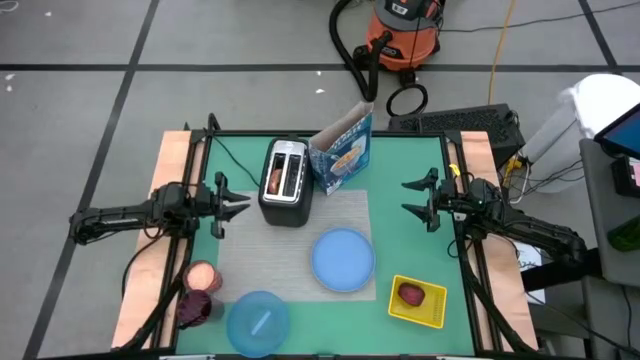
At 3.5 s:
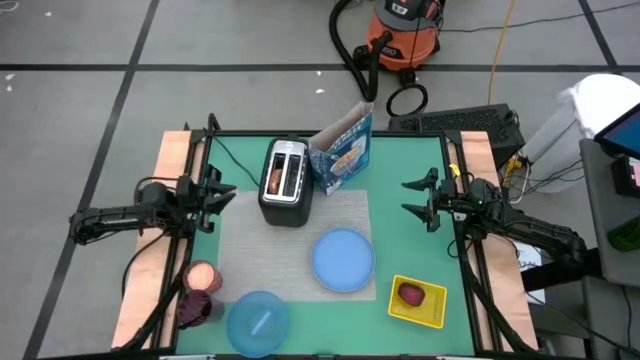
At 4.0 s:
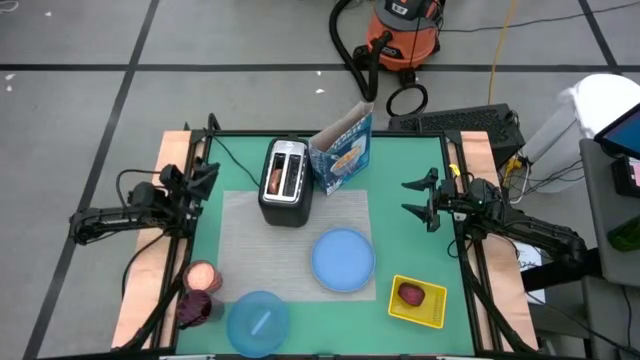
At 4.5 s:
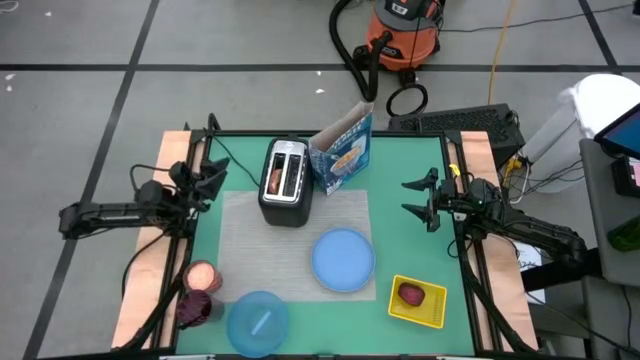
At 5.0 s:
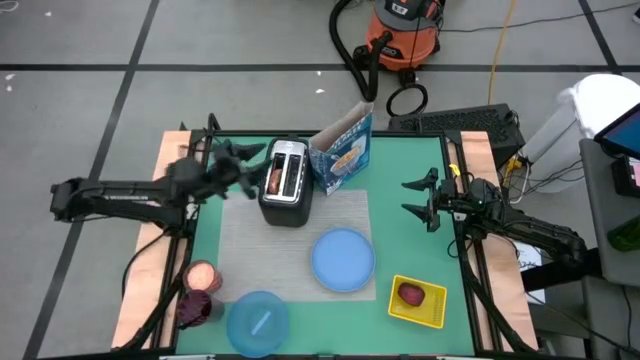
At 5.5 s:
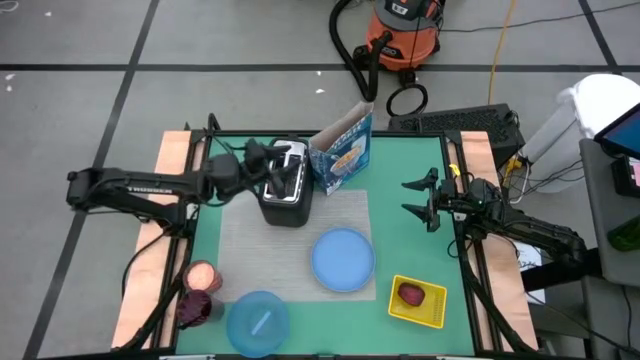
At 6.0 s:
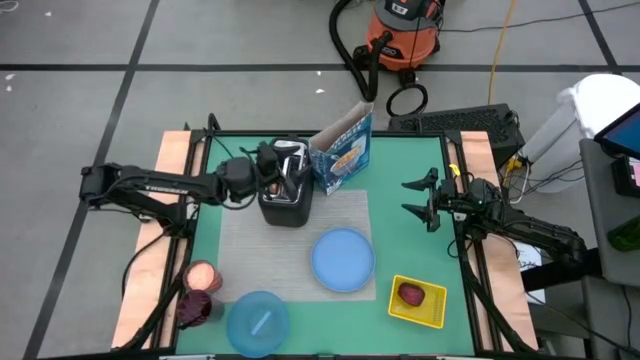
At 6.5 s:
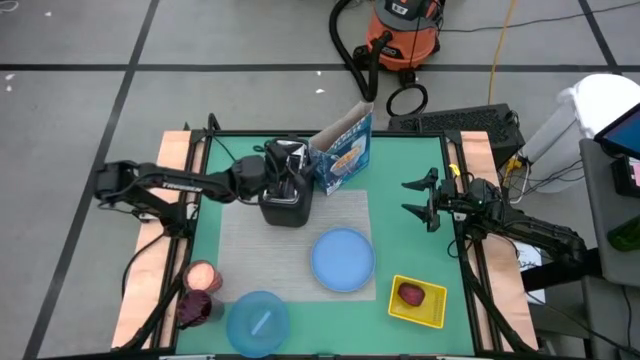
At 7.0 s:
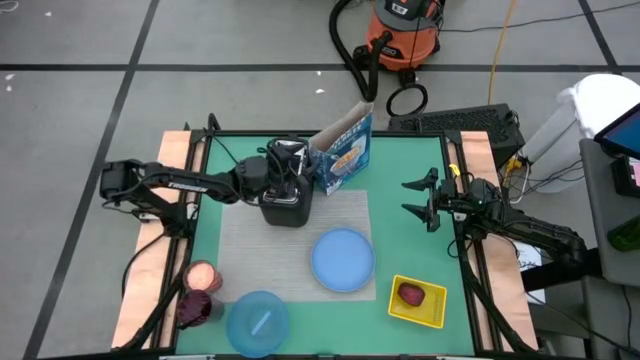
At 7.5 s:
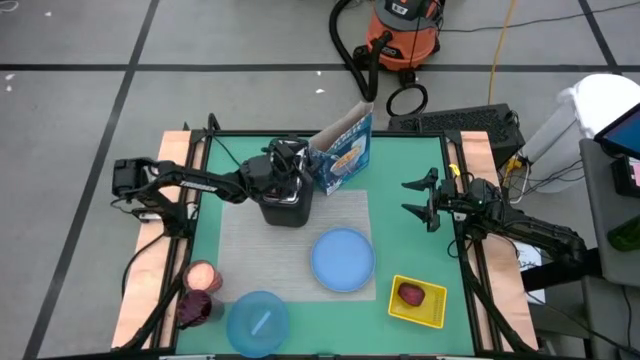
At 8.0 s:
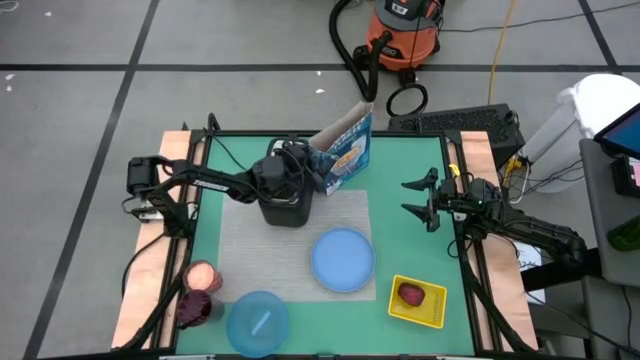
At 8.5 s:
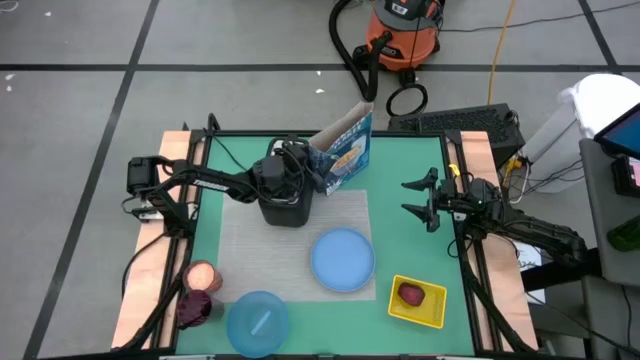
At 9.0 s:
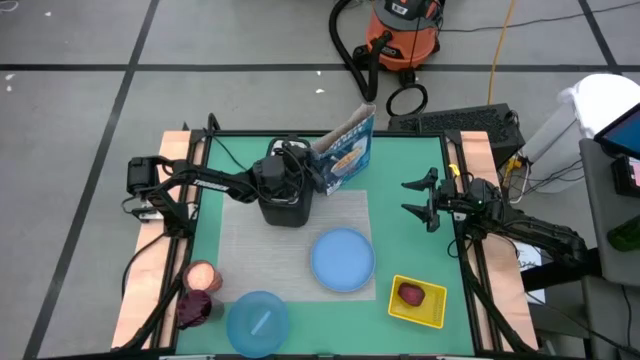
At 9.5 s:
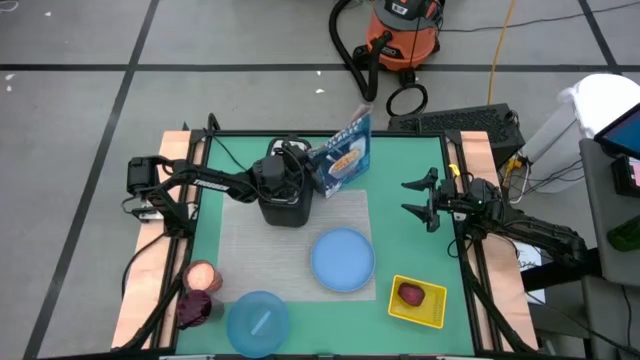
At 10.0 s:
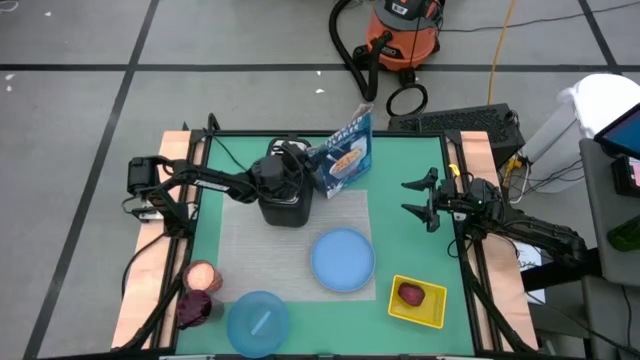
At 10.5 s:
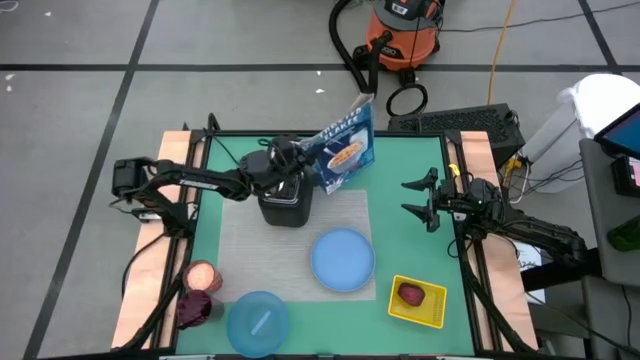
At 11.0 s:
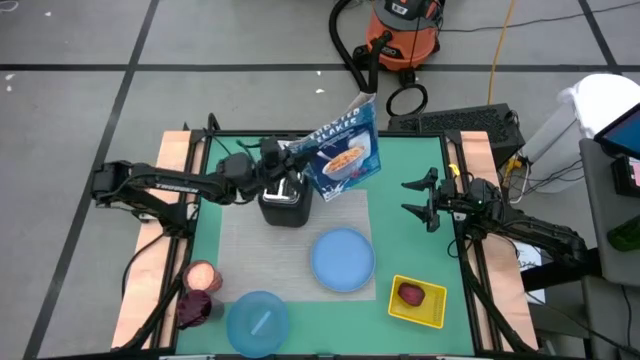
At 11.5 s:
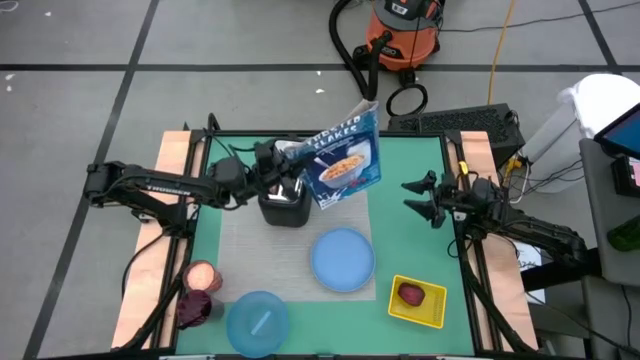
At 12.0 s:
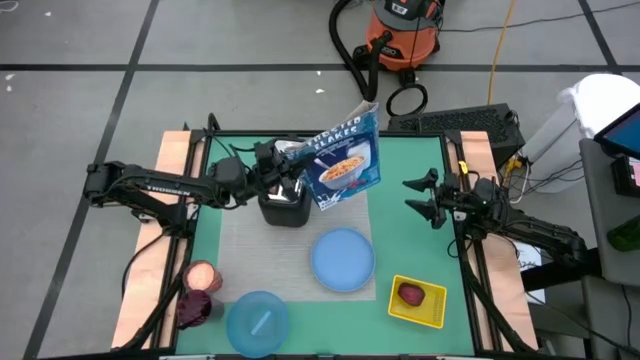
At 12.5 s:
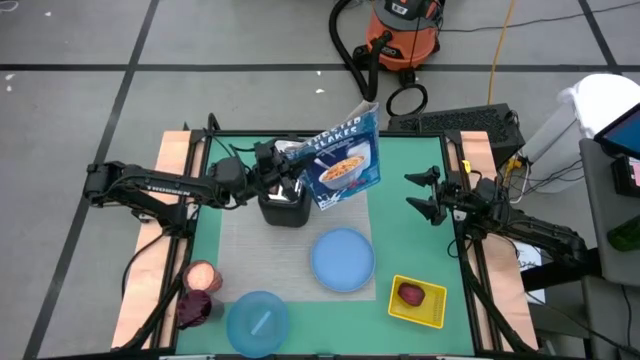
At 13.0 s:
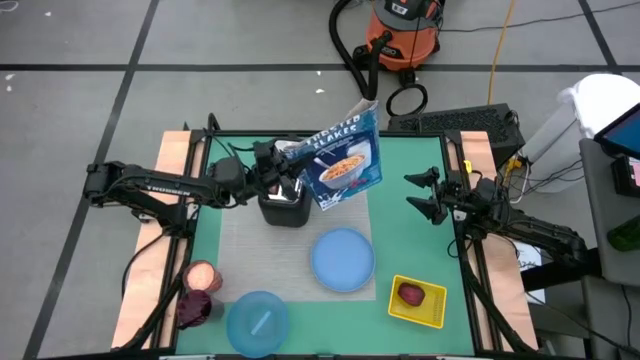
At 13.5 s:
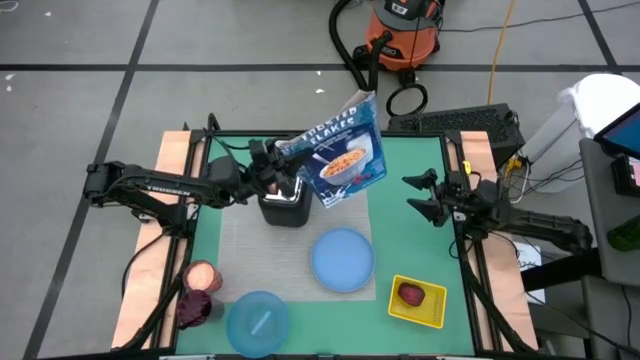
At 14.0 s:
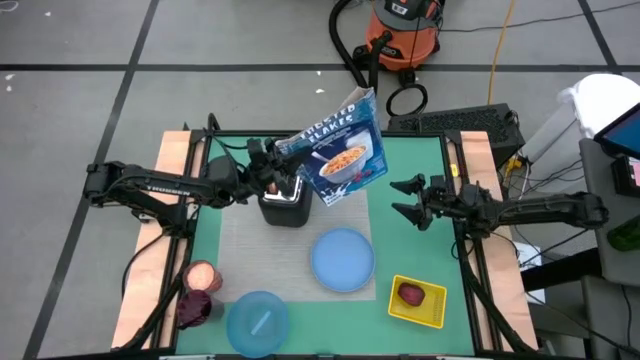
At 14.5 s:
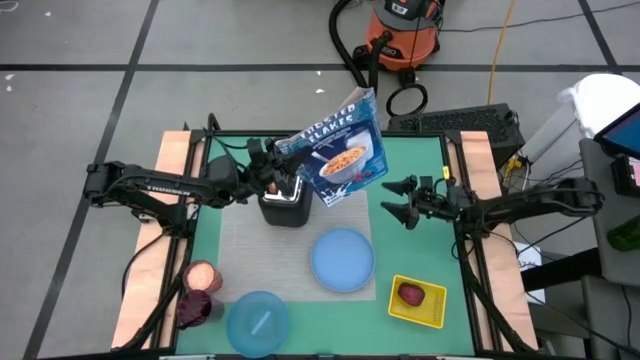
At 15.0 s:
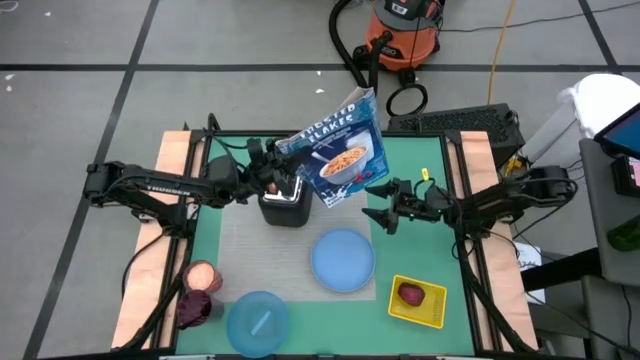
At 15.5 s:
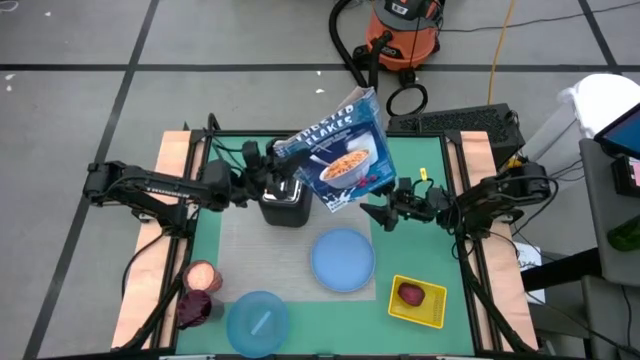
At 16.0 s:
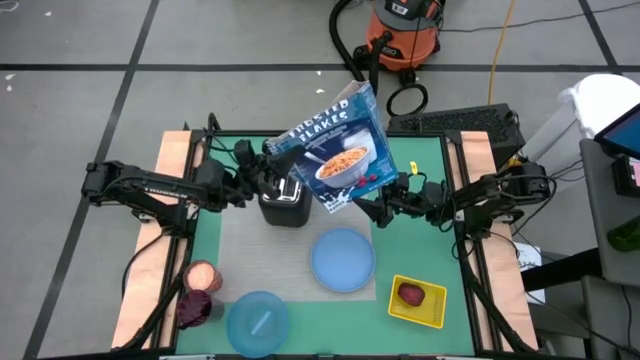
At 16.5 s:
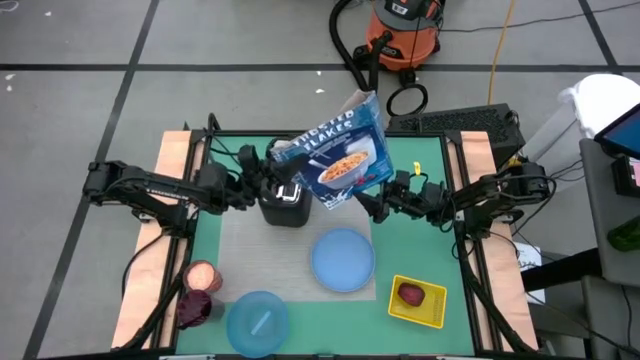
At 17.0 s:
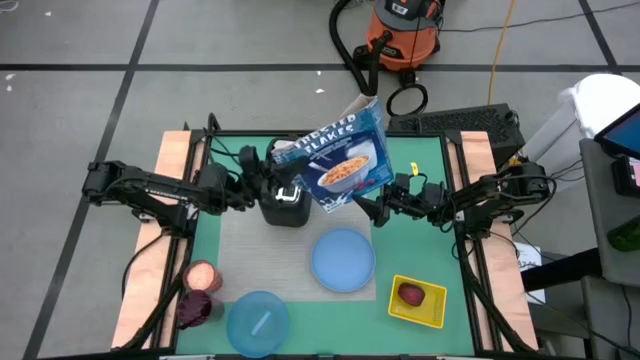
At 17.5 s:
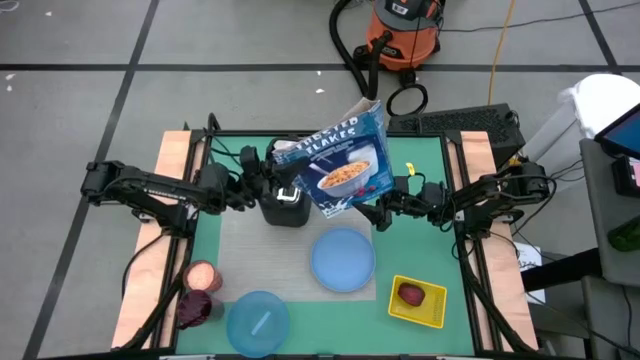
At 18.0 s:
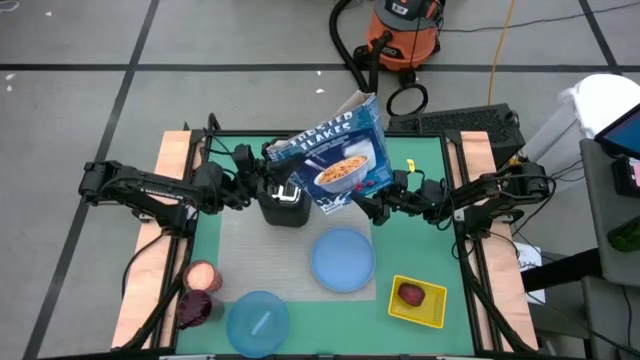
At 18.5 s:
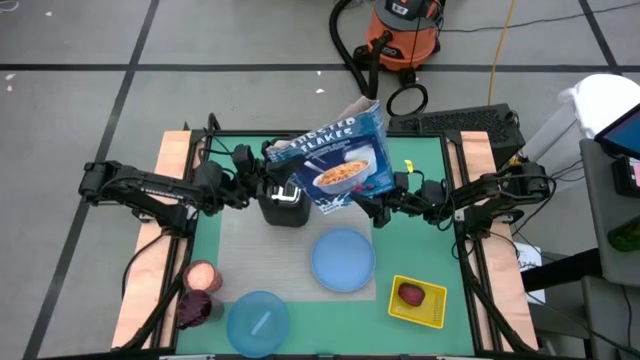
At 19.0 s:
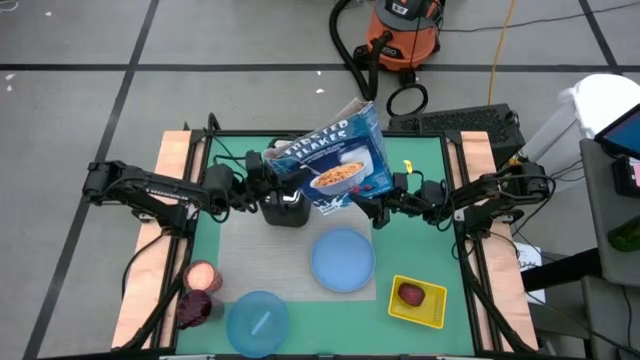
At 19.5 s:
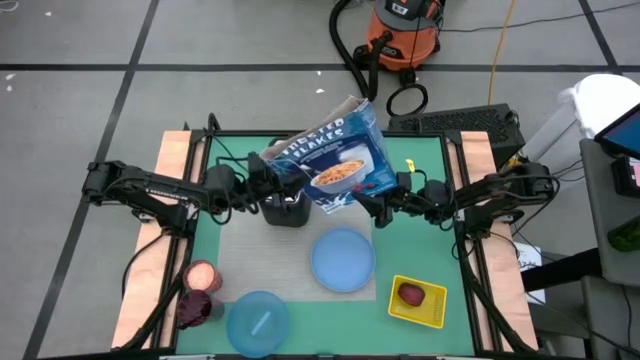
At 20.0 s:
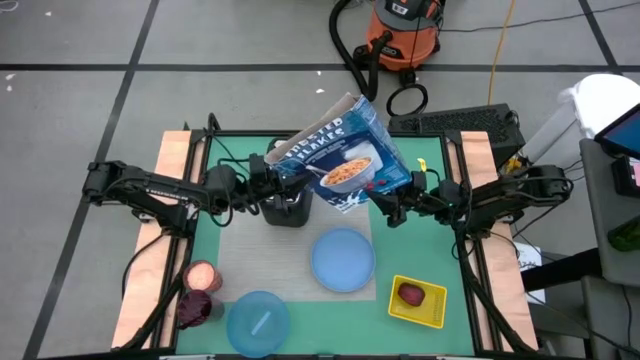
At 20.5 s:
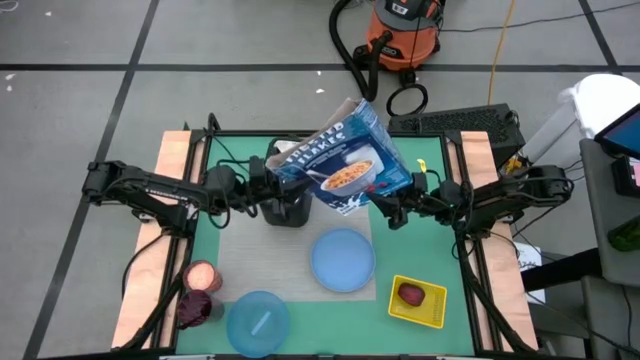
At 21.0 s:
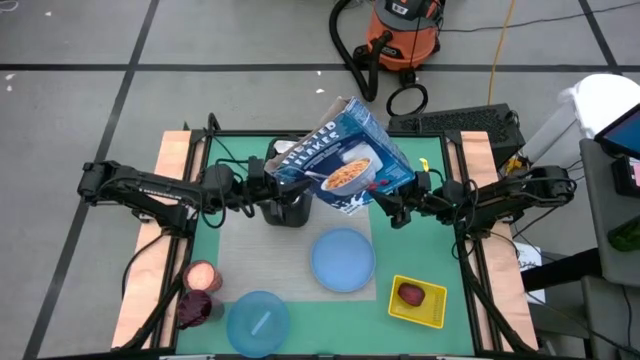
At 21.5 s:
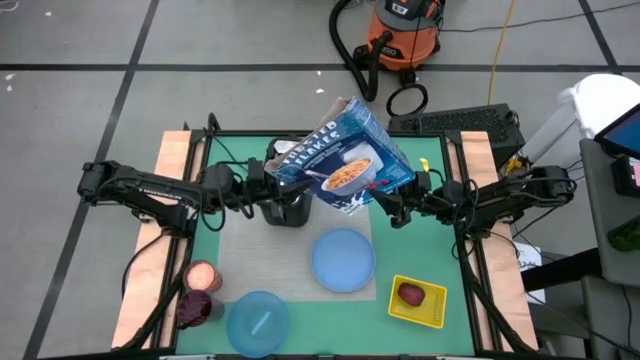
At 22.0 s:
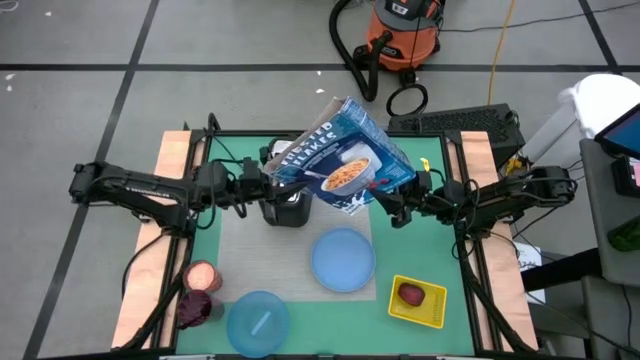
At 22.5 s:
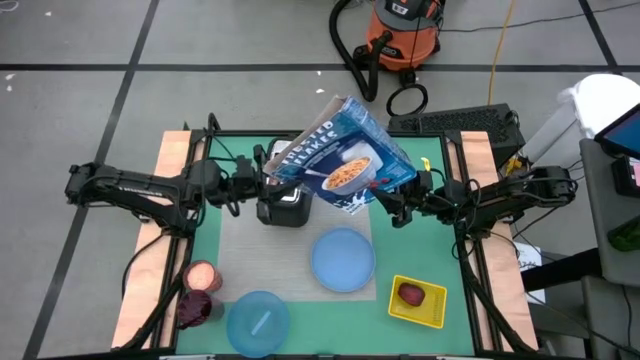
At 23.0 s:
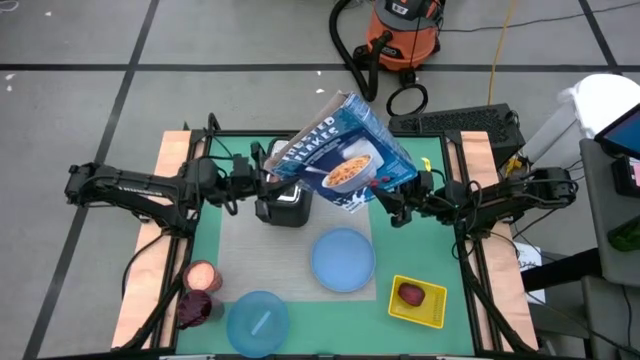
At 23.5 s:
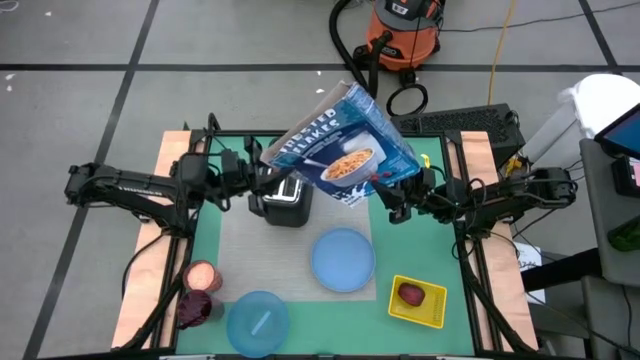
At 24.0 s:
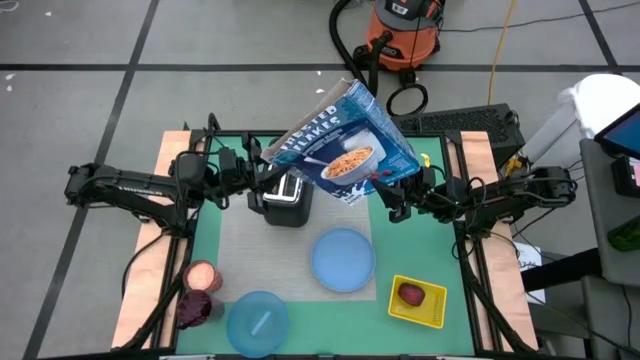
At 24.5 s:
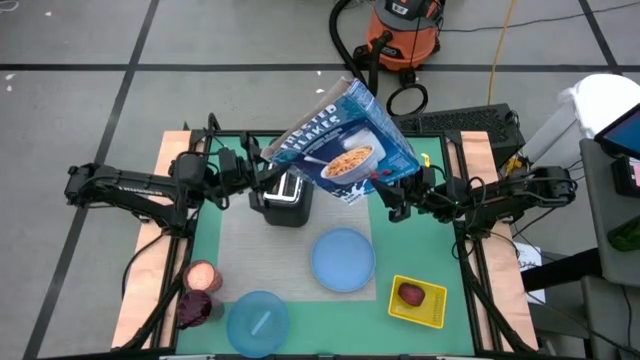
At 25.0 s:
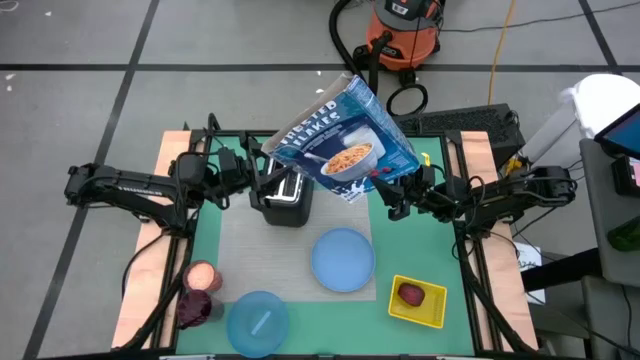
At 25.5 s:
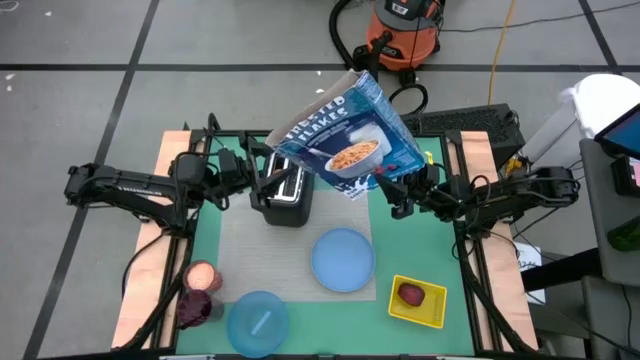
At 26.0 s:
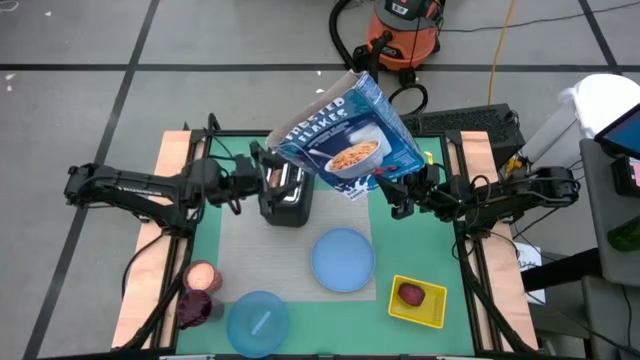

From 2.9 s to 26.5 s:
Task: Arrange a breakfast setting
Pour the cereal into the blue bowl
